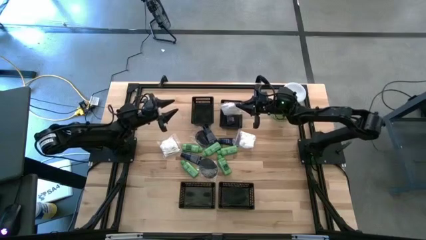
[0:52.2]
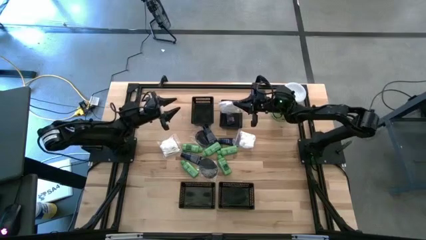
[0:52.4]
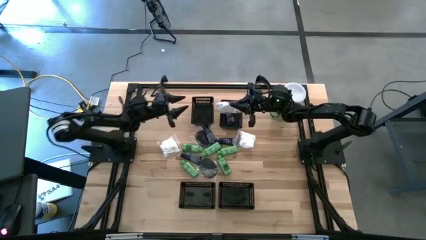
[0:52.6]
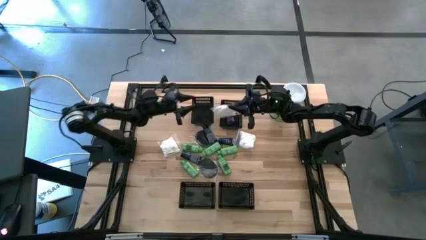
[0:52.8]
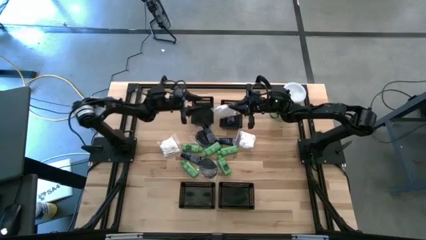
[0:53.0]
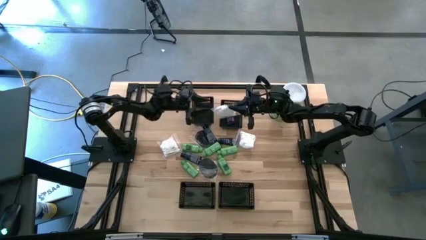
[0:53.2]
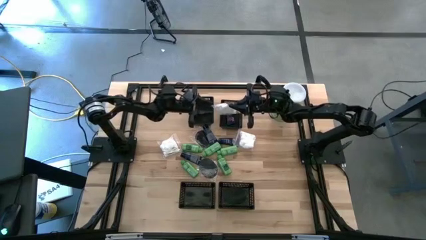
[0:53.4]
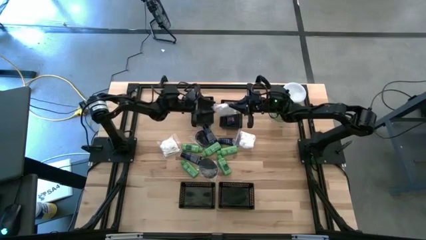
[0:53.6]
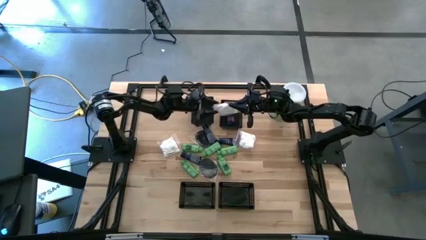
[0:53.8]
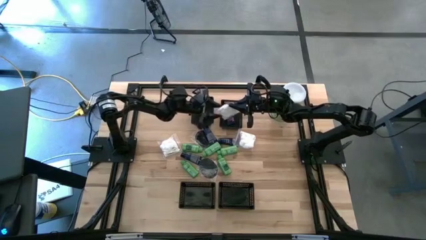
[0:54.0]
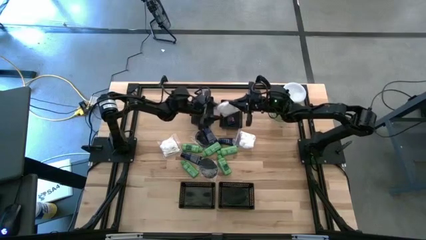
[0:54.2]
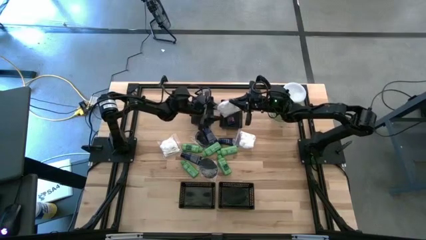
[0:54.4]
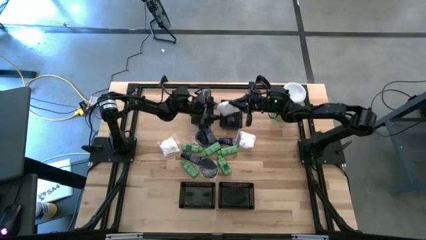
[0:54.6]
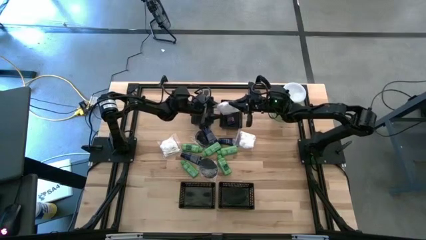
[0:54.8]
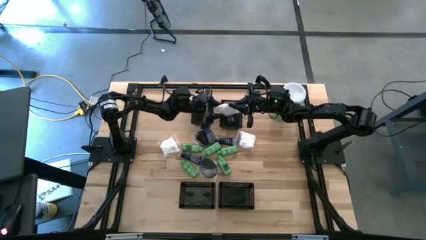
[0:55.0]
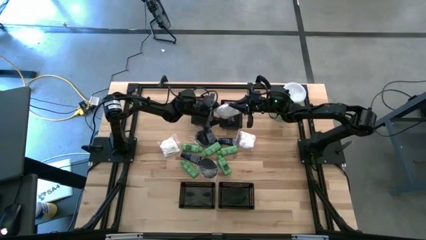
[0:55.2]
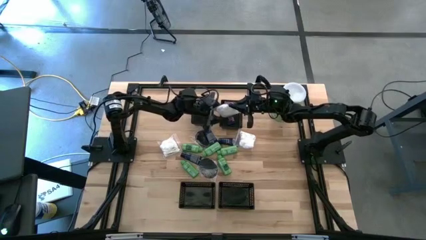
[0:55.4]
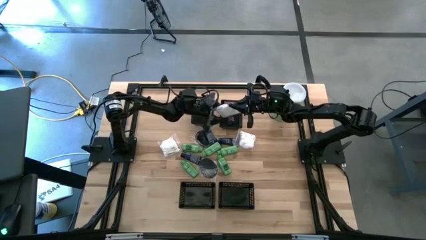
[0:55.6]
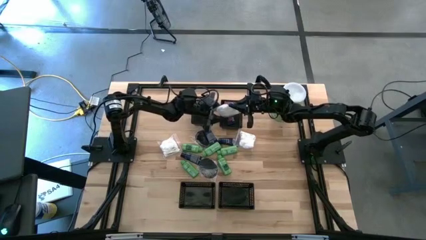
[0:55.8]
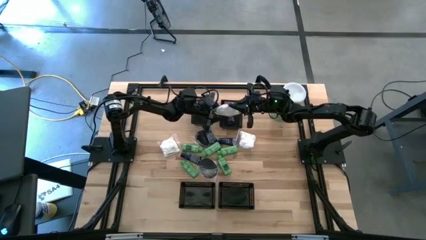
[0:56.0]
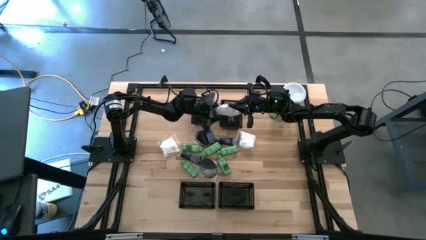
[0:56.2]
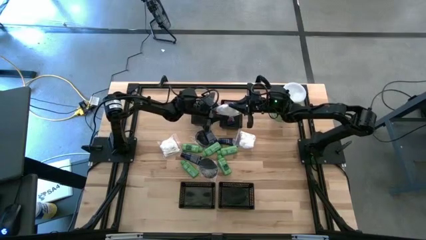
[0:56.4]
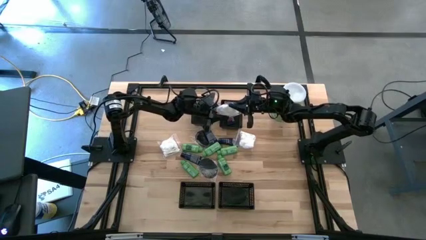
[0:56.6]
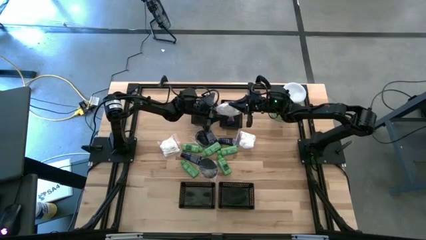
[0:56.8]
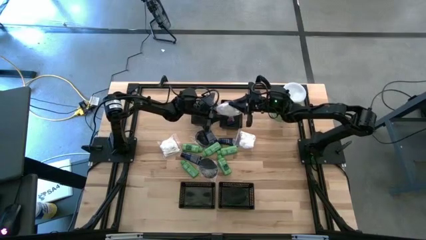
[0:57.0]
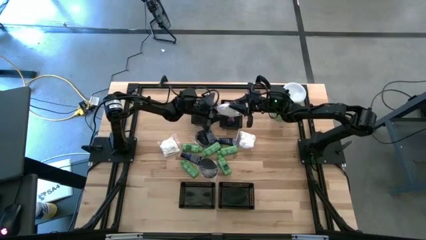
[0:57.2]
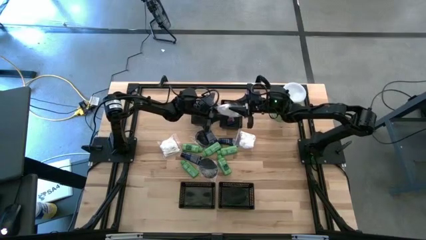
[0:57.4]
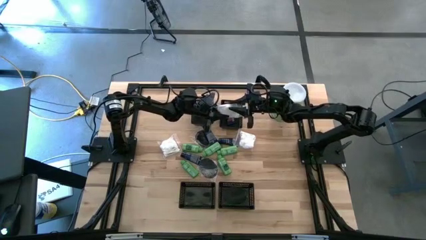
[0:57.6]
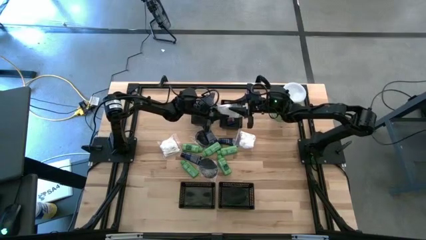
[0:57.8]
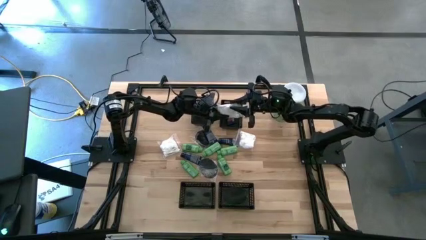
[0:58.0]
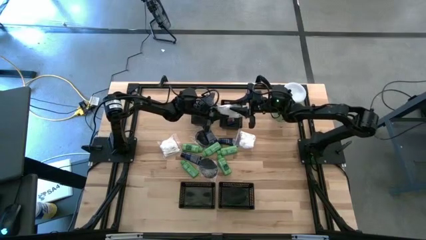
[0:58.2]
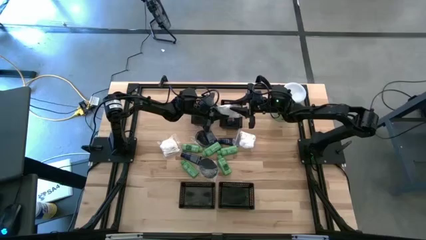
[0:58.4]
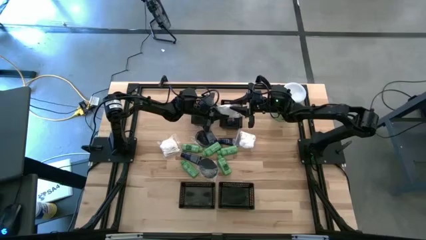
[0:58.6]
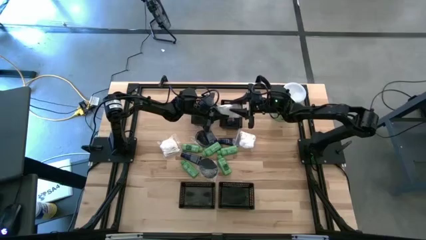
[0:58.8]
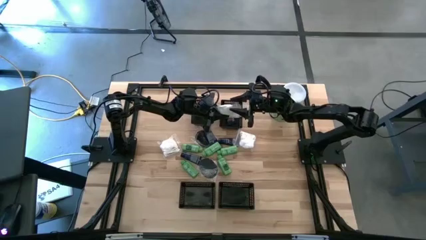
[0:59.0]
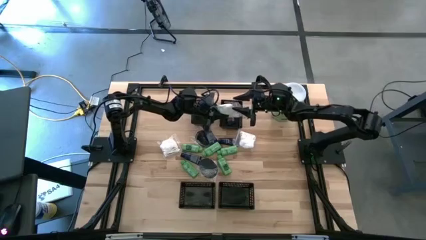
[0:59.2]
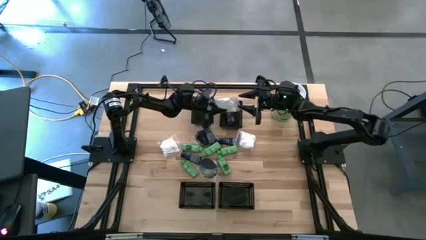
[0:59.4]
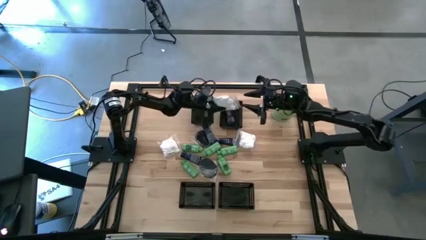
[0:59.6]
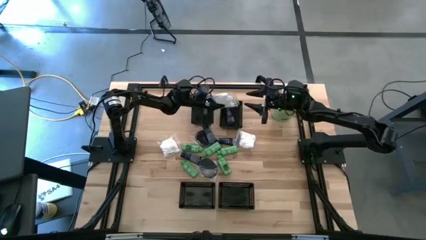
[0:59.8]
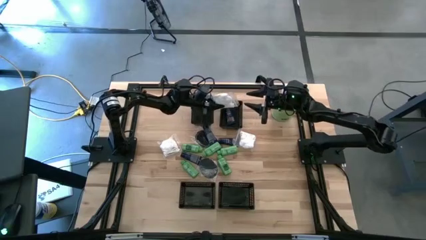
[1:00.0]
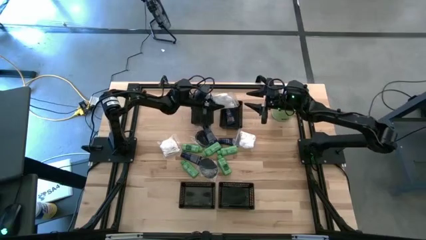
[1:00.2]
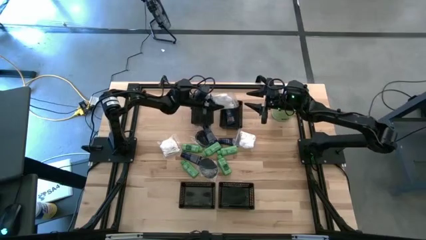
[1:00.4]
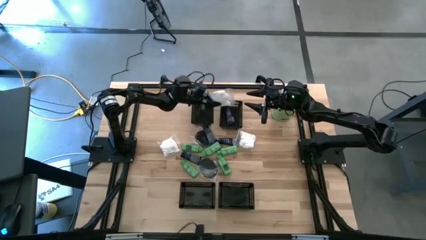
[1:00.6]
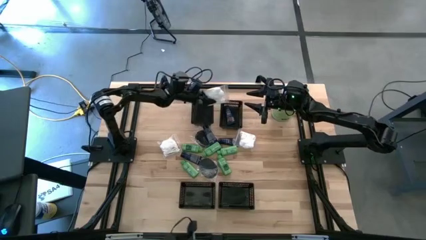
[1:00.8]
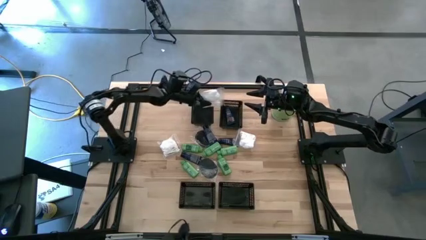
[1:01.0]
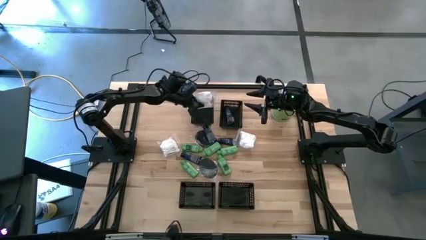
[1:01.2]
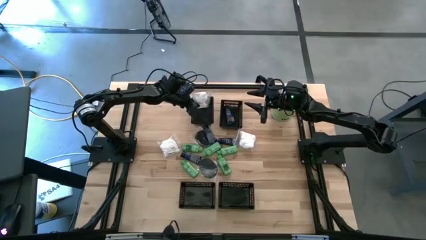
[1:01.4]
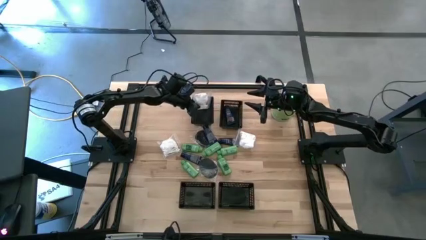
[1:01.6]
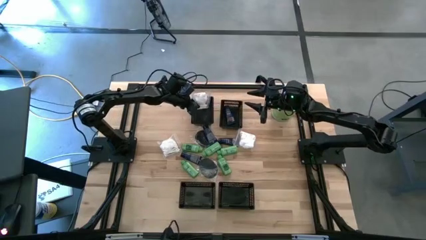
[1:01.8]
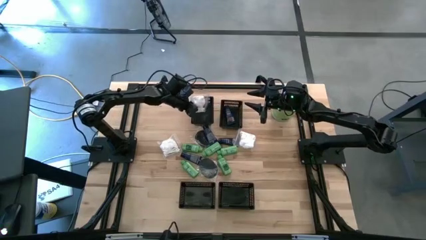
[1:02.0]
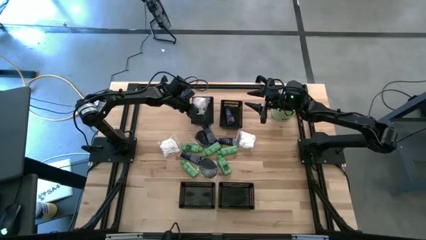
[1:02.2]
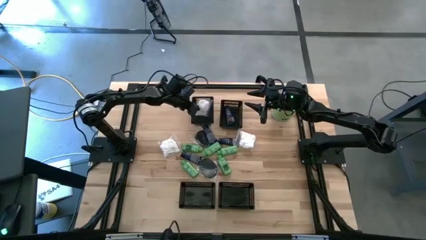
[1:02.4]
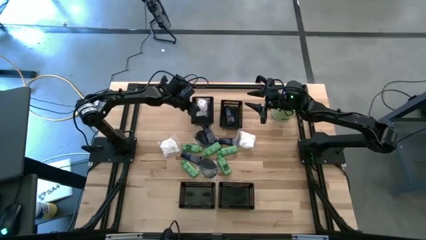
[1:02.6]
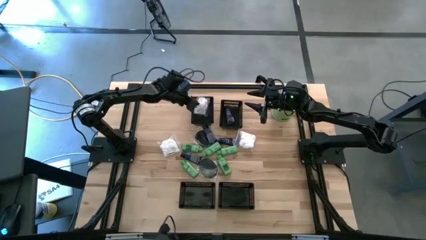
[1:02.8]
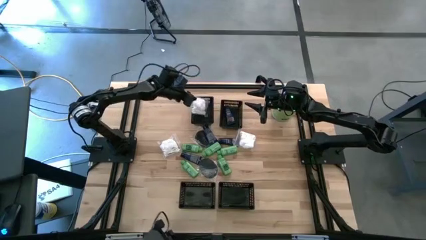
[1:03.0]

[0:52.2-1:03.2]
Task: Pick & Place Travel size toiletries
Put the cotton pack into the top left black bin

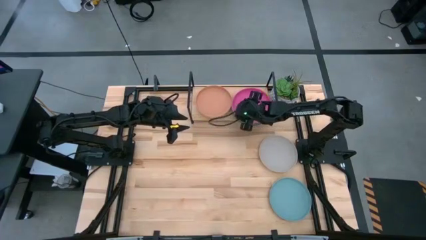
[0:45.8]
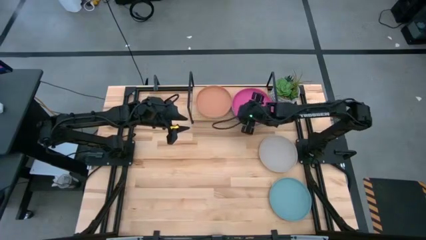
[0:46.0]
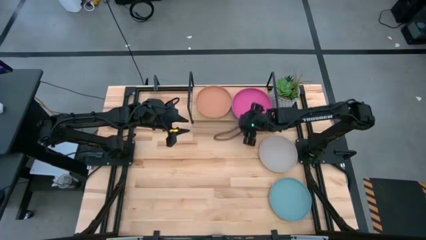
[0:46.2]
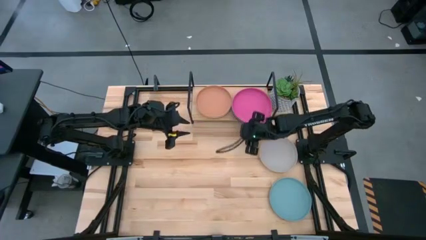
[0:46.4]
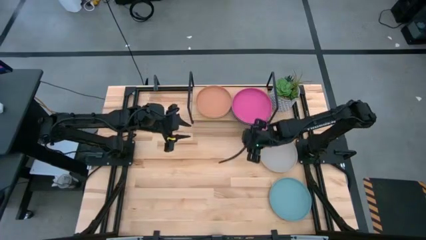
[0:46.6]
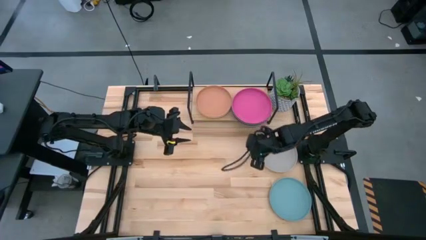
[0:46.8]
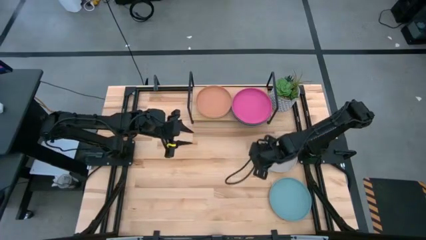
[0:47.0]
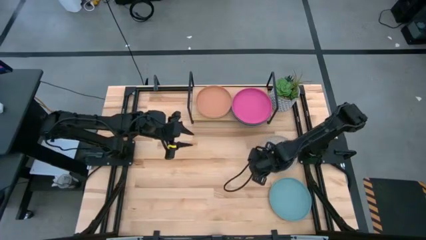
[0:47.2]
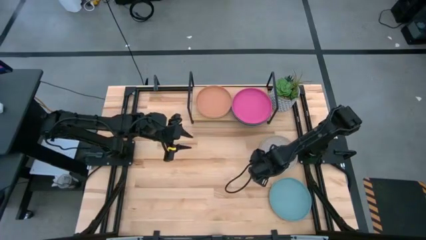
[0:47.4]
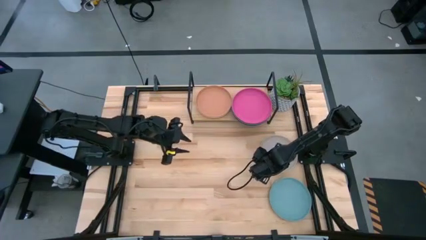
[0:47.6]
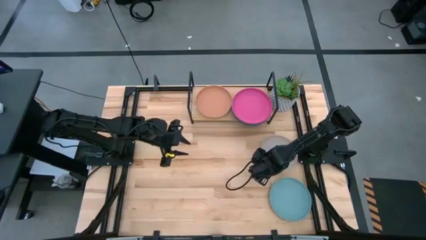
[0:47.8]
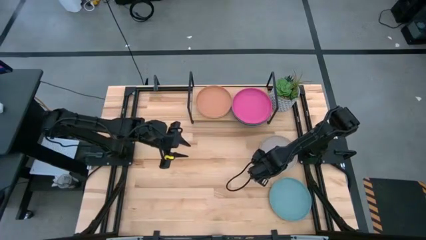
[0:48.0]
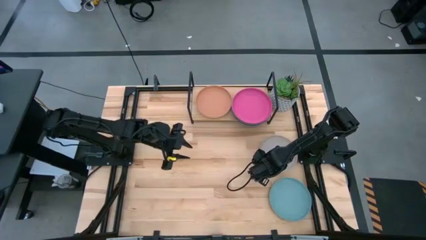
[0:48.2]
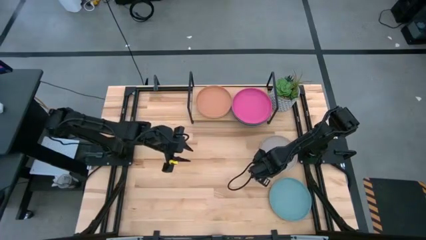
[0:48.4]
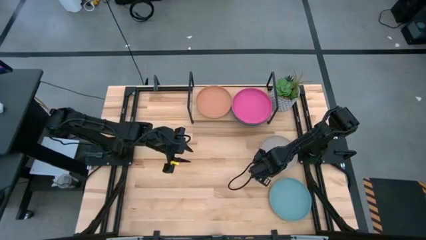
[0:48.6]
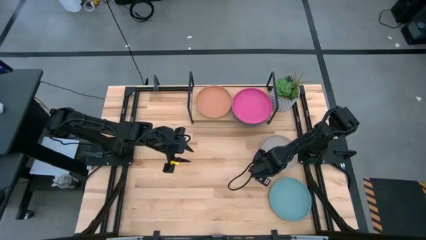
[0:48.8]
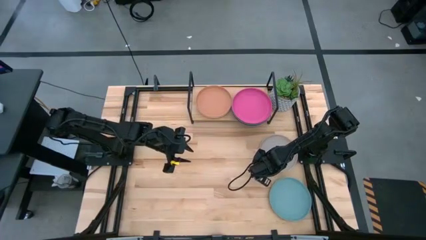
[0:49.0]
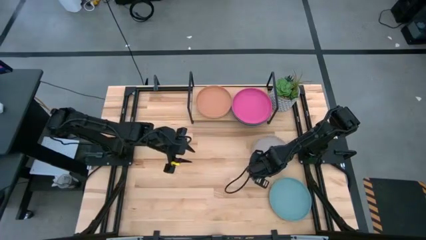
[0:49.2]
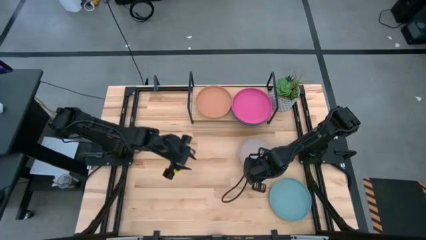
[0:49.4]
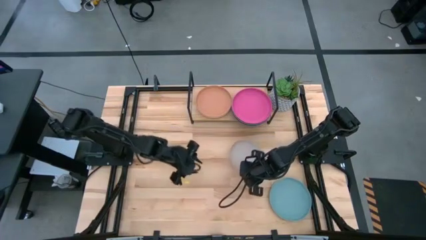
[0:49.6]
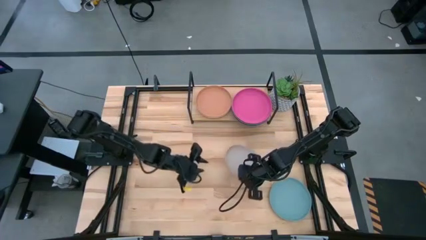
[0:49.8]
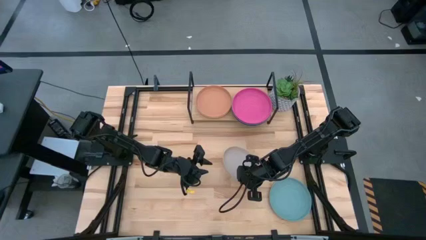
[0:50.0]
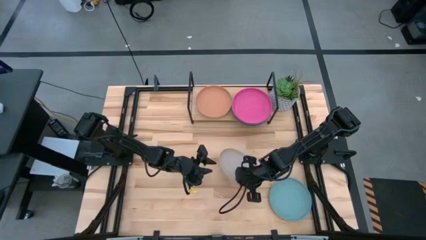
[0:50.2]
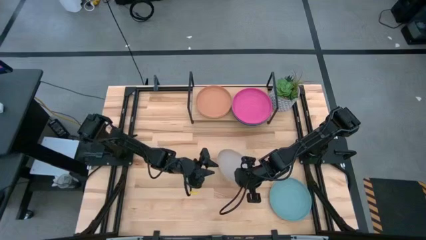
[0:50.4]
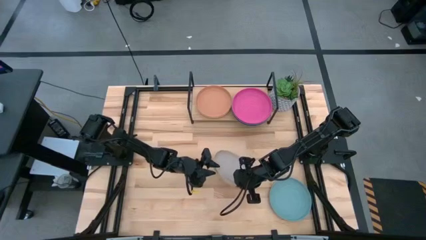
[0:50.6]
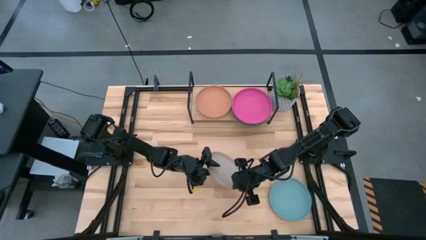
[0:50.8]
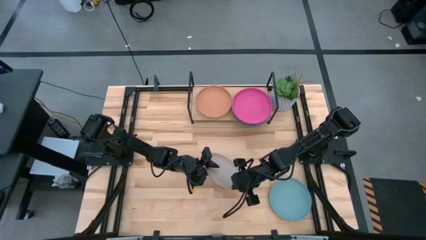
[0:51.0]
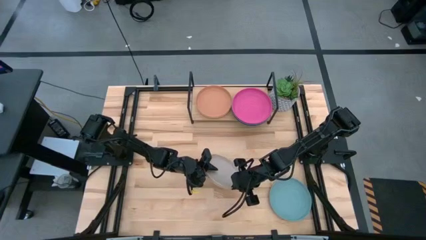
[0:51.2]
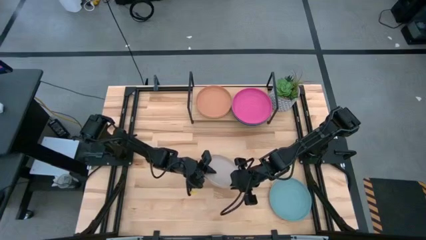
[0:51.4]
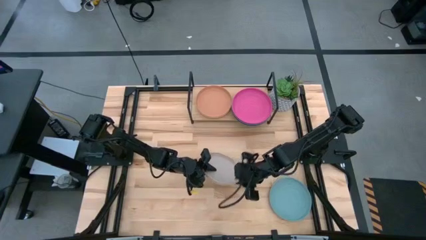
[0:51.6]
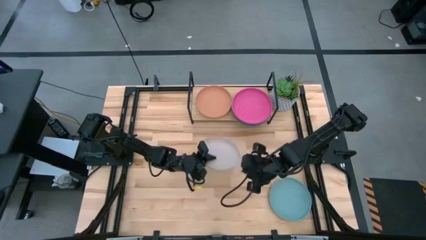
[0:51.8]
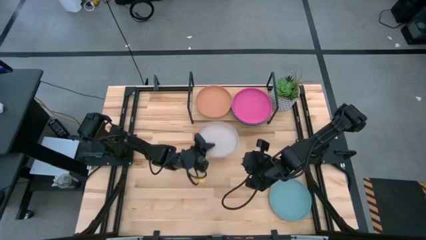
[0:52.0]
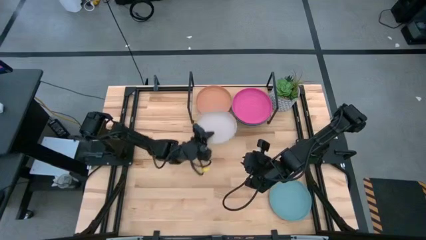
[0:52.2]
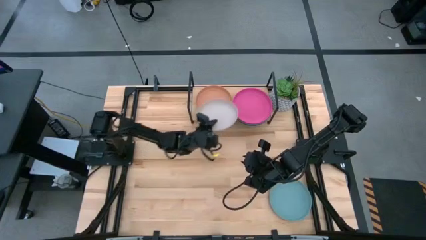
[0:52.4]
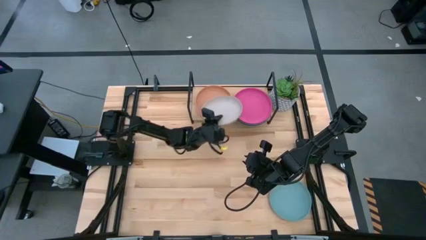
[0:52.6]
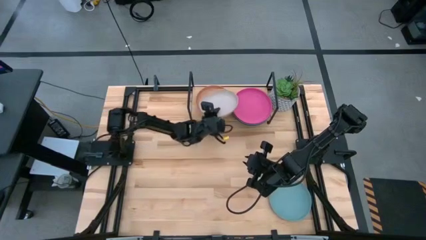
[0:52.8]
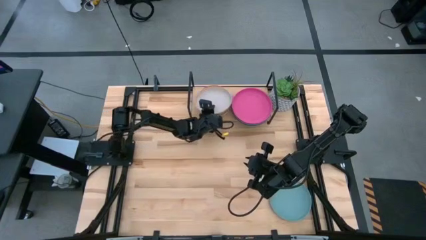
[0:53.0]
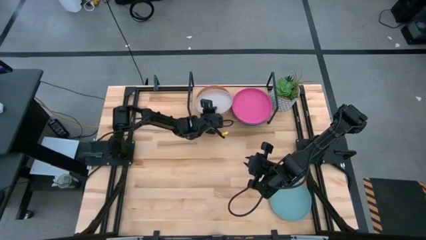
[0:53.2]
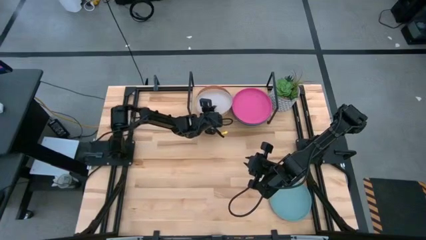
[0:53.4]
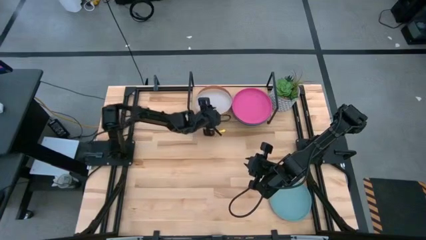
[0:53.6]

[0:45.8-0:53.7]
Task: Place and stack plates onto a shelf
Stack the gray plate on top of the brown plate on the shelf
